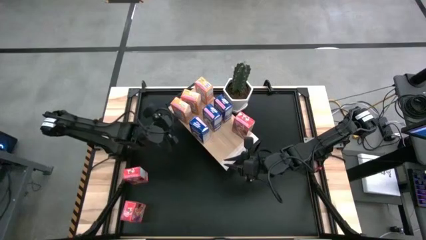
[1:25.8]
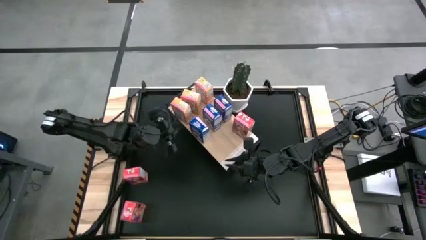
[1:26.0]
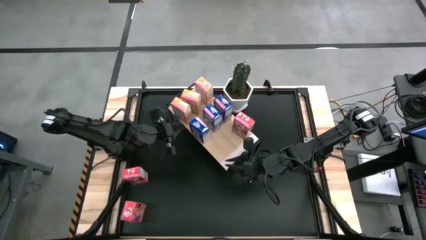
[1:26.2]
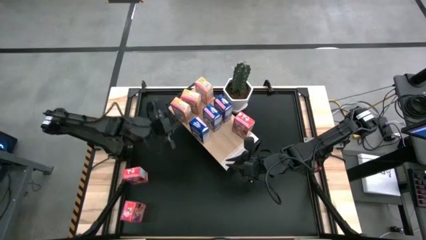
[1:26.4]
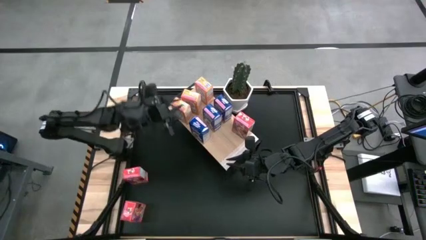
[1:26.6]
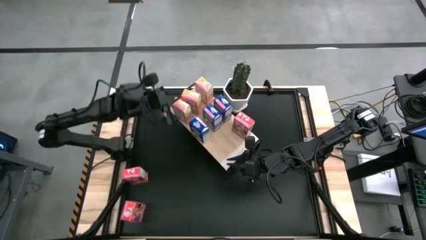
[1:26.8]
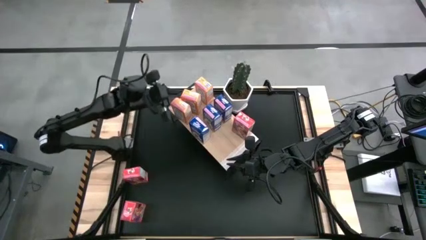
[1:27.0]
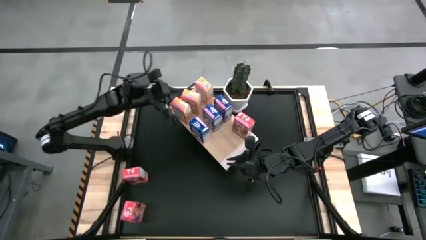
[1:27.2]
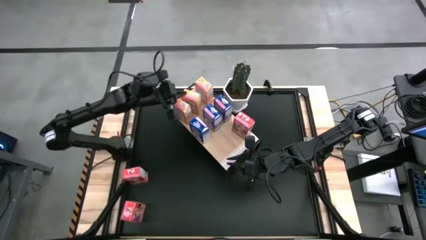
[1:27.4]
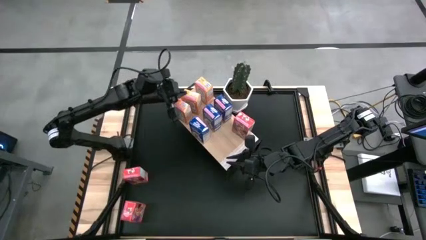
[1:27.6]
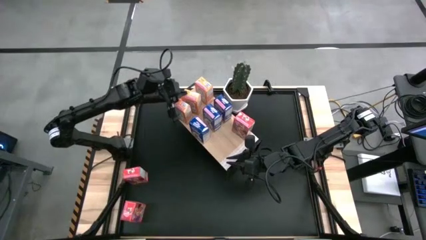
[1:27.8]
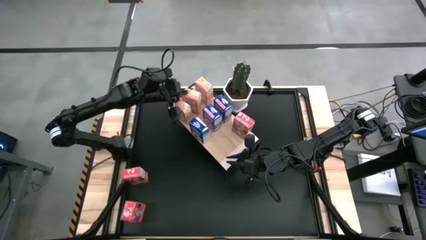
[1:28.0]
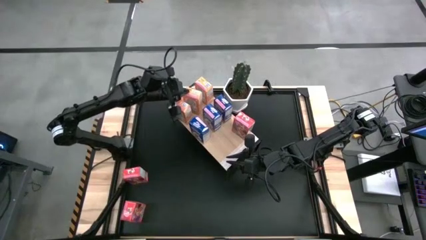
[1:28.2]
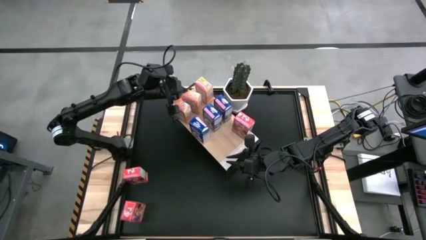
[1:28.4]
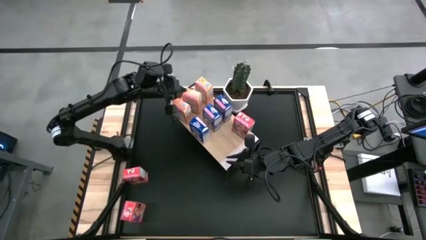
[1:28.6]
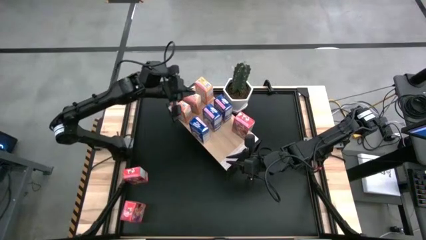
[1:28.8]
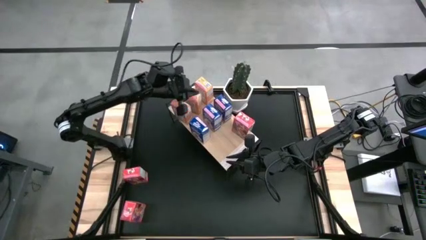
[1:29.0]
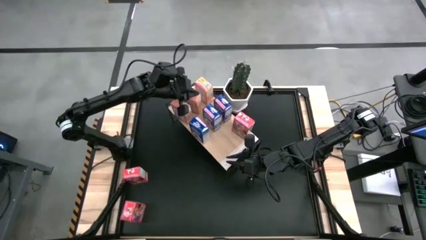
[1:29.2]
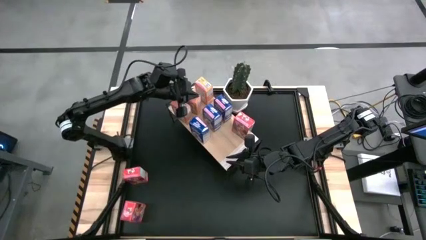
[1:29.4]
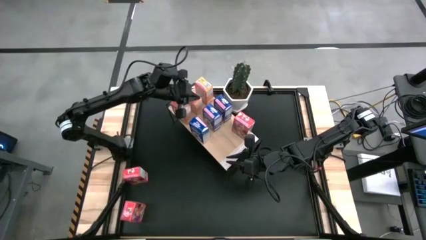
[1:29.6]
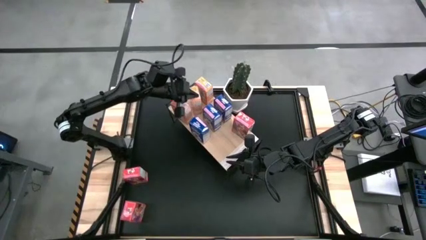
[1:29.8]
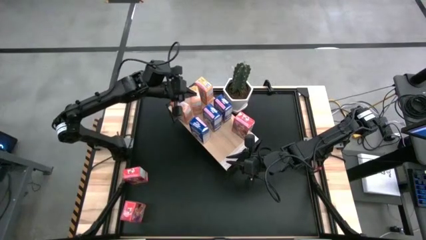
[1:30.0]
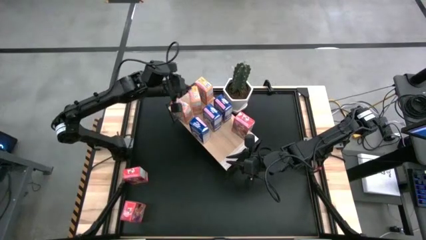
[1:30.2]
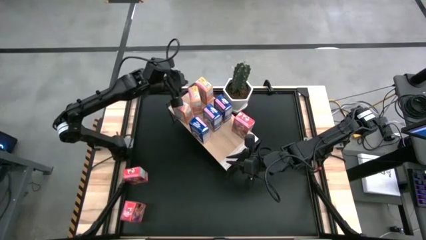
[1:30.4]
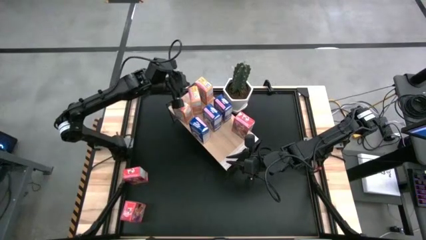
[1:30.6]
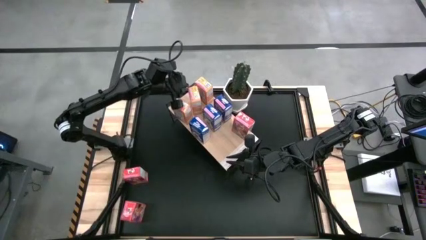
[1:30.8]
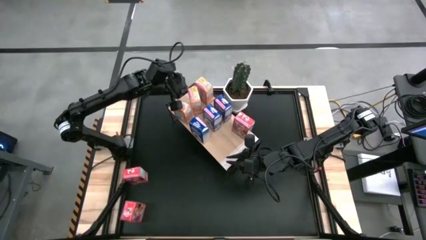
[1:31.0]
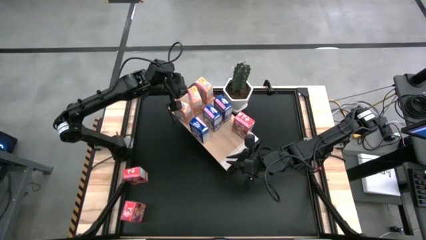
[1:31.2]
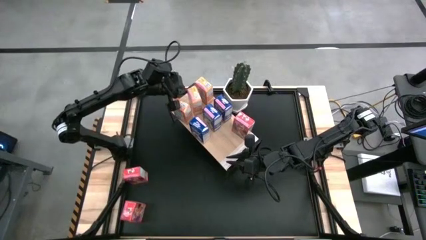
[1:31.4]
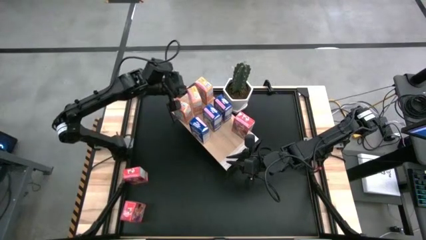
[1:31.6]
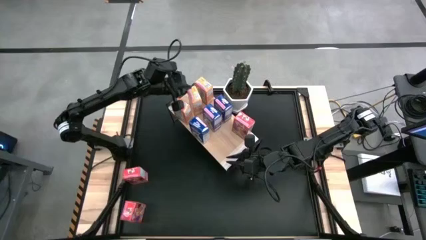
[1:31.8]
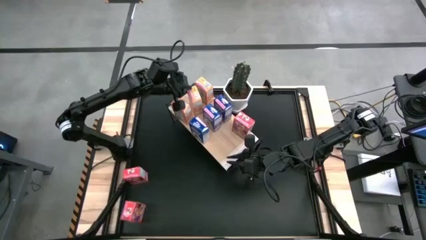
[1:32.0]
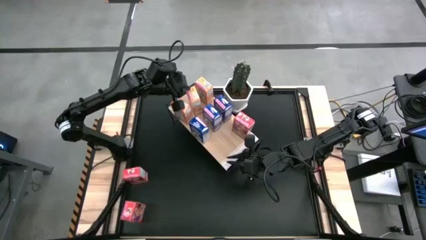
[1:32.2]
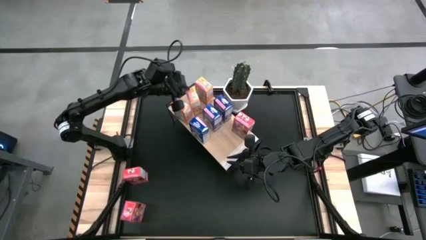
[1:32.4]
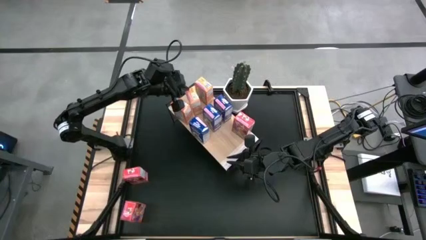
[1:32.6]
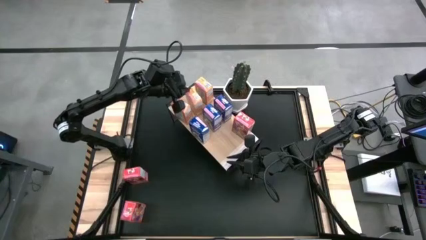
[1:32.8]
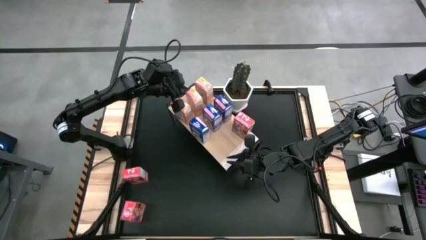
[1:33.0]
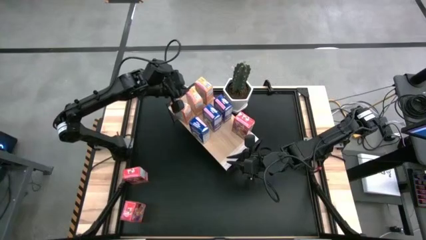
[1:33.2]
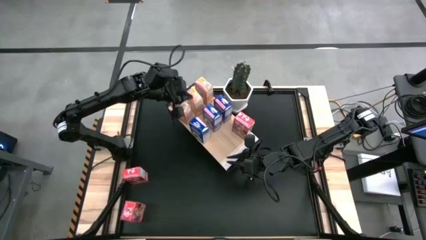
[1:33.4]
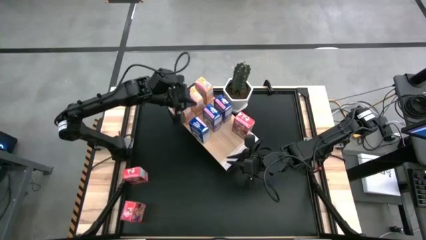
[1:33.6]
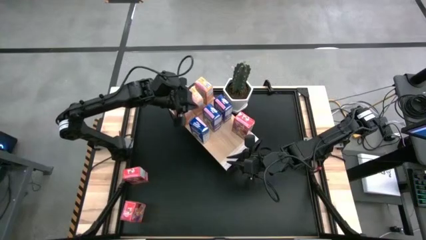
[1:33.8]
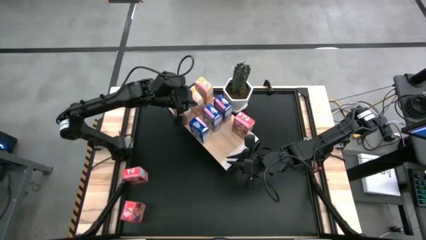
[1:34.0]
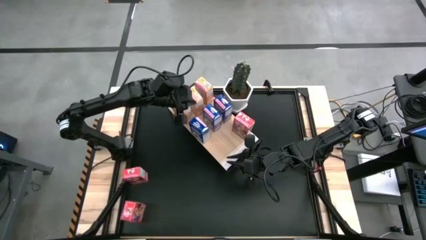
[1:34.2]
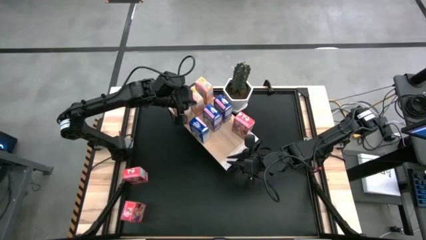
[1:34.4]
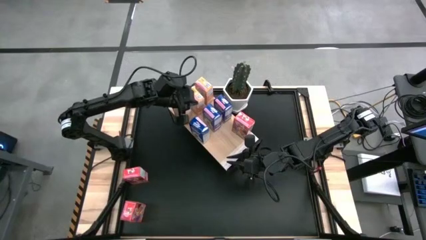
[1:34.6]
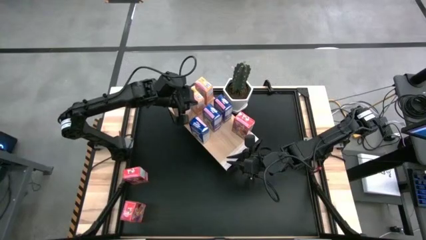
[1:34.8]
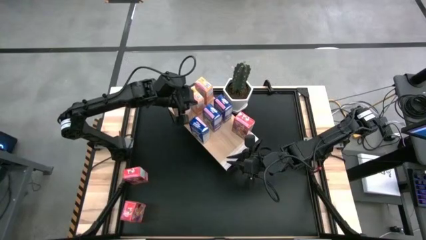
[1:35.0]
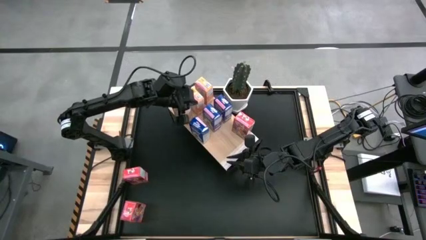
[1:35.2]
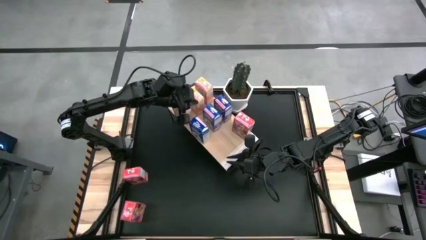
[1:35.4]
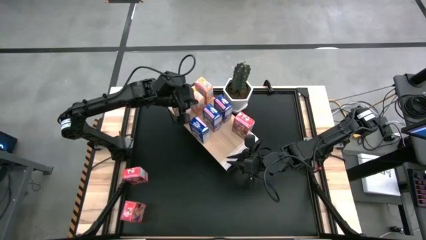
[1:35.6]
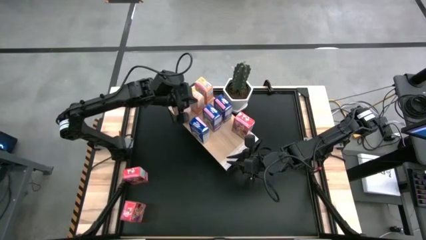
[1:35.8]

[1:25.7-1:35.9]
Task: Stack cereal on shelf
Adjust the middle orange cereal box on the shelf

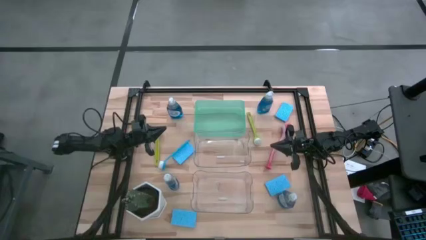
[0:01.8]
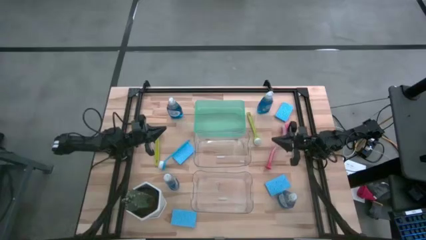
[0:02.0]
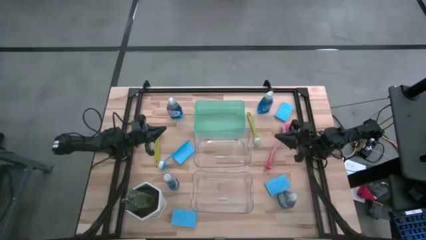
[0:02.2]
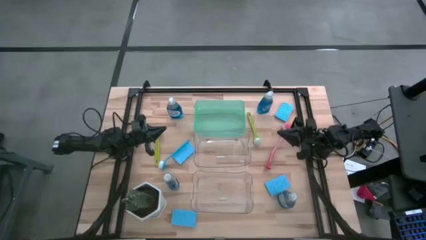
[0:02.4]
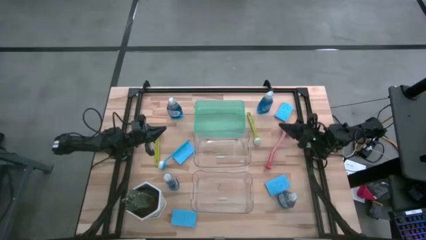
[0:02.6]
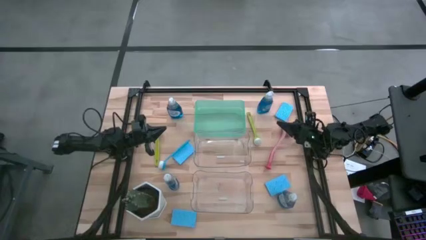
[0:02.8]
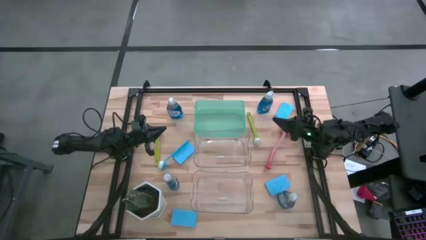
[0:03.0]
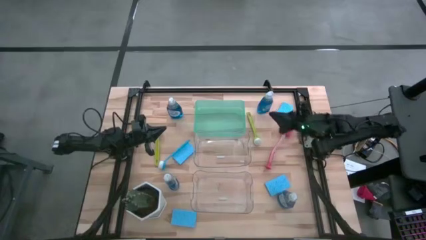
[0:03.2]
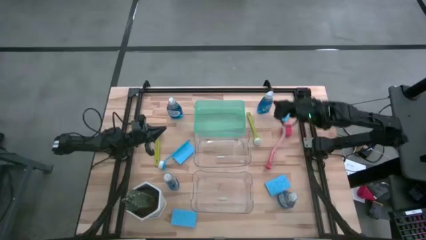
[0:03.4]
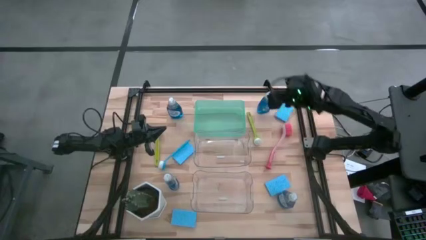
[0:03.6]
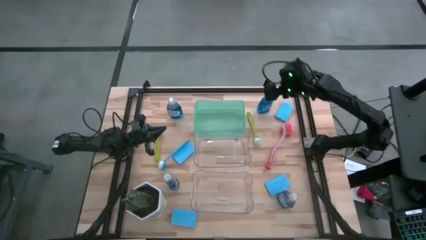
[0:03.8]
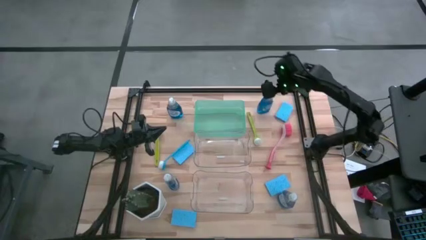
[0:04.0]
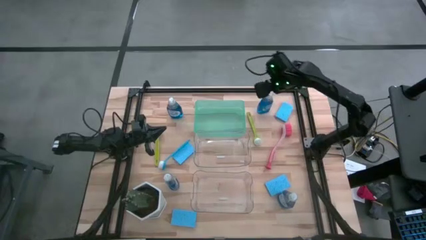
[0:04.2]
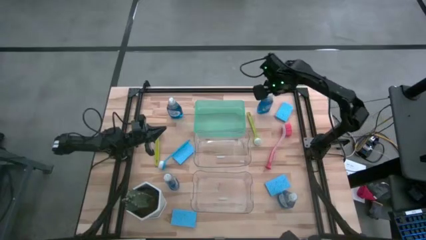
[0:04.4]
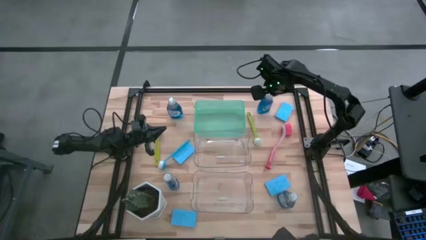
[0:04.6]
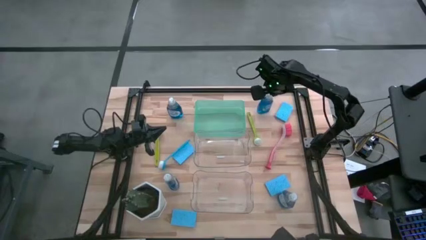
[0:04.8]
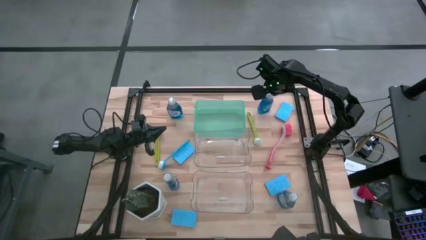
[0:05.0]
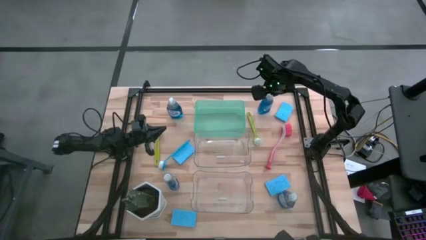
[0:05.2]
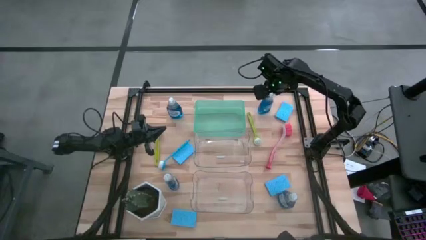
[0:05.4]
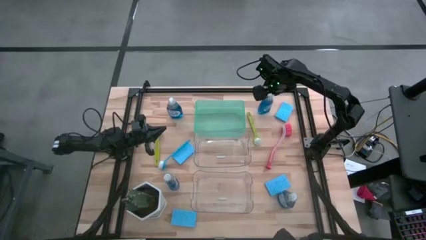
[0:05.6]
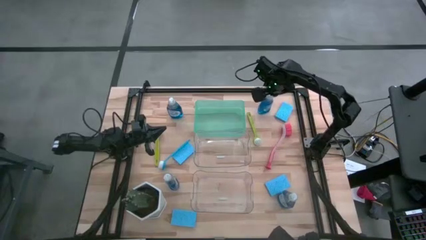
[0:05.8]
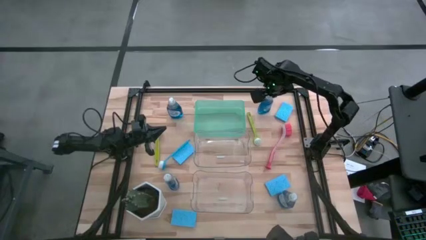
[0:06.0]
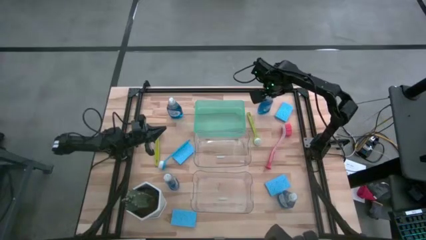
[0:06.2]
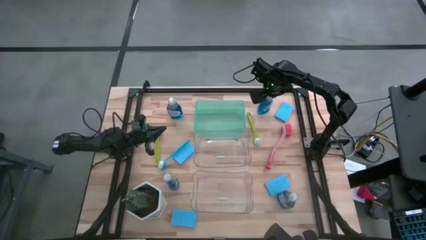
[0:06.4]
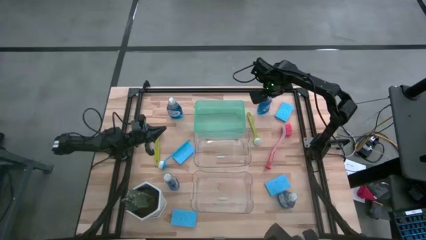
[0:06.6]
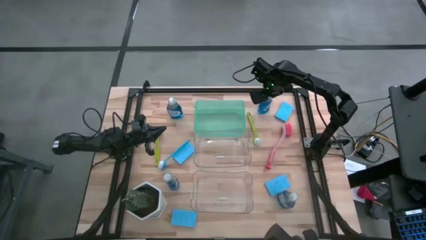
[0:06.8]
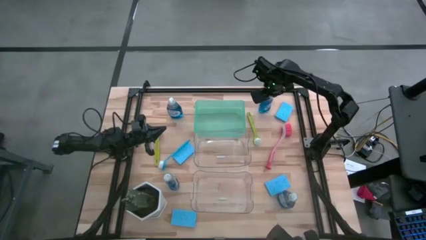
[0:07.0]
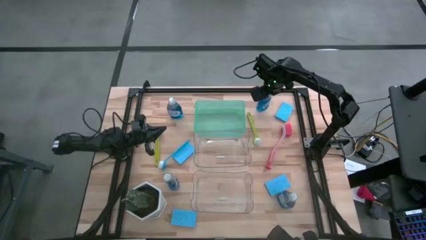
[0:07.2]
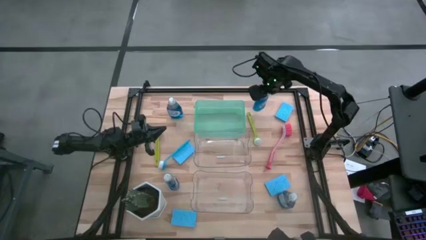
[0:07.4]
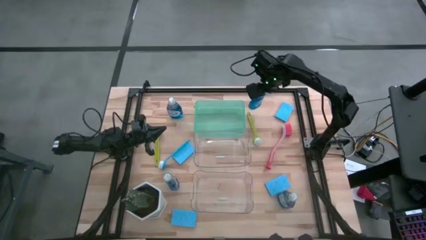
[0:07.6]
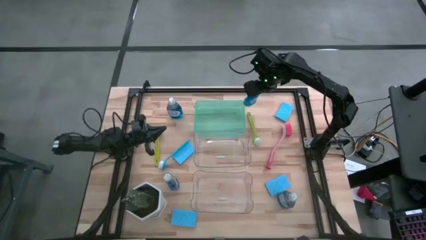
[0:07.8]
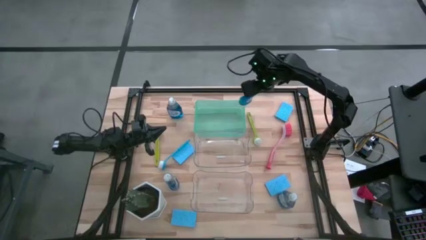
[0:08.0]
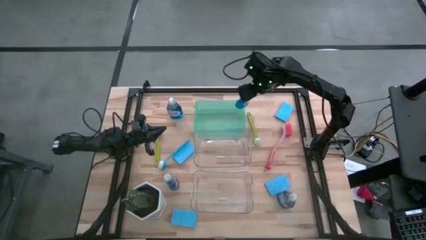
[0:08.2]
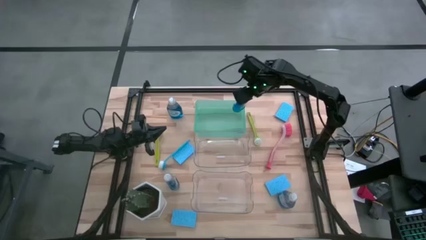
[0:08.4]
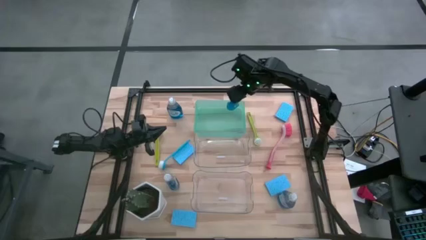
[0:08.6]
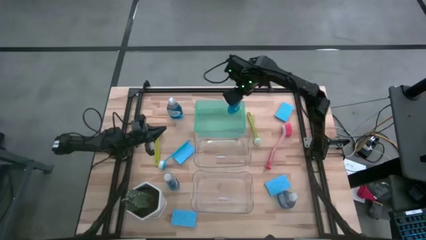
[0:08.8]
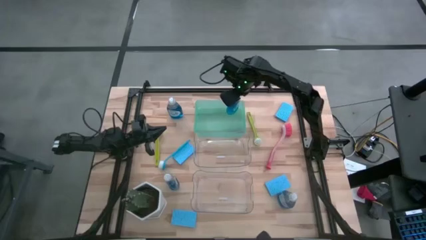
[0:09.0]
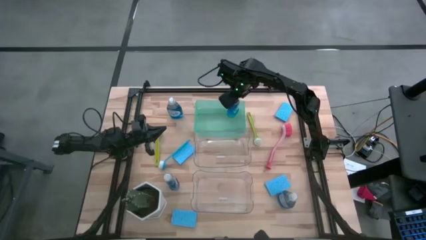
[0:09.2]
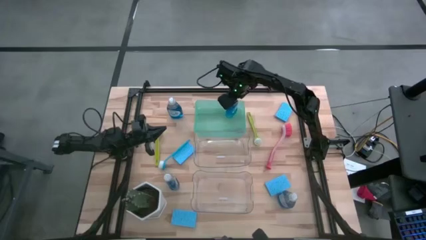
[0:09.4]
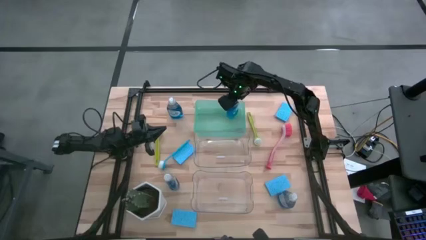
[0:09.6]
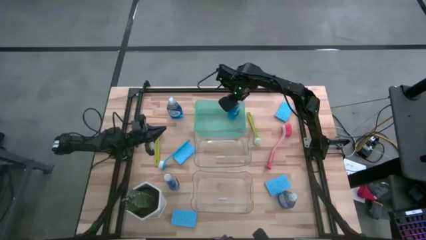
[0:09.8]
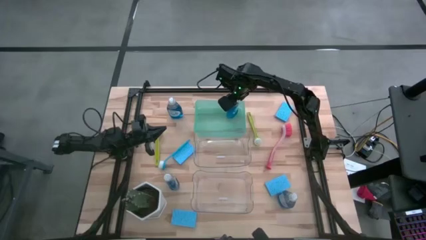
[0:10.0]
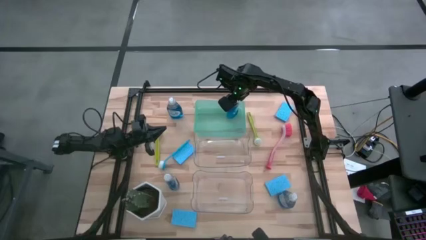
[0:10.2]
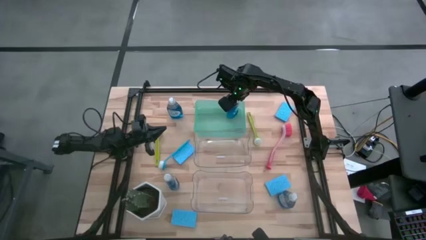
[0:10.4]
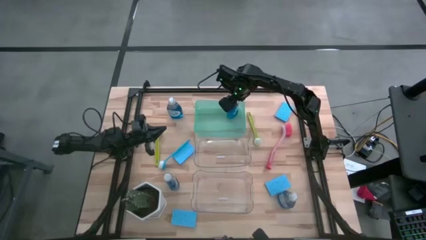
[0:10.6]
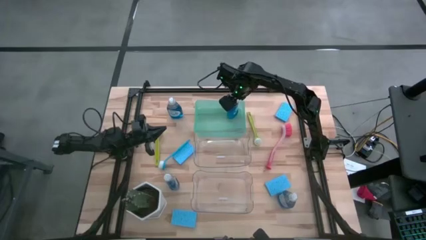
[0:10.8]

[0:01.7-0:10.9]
Task: Pick & Place Kitchen Sink Supplies
Put the blue dishwashing liquid into the green bin
